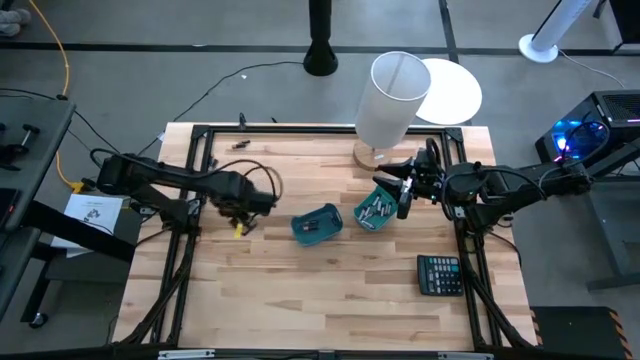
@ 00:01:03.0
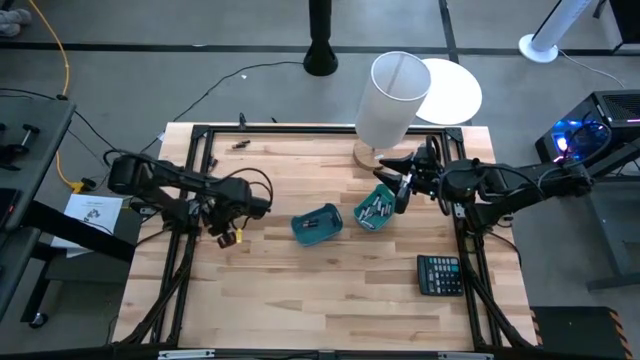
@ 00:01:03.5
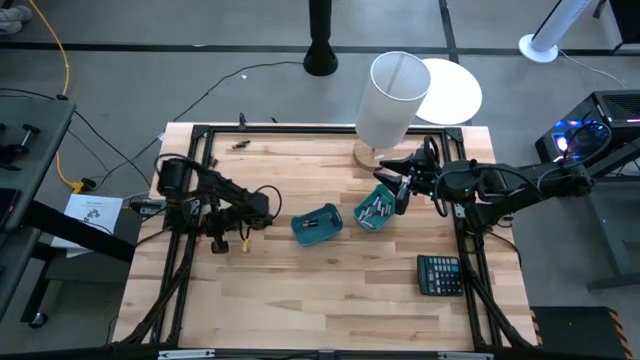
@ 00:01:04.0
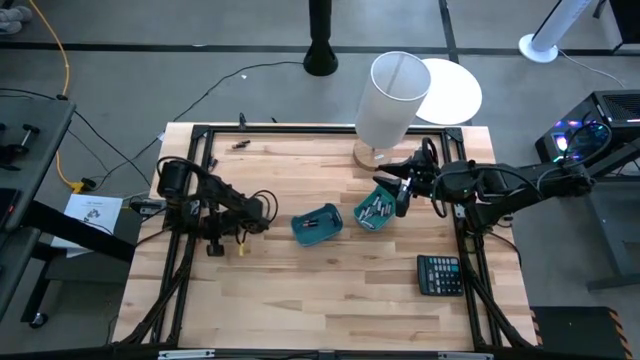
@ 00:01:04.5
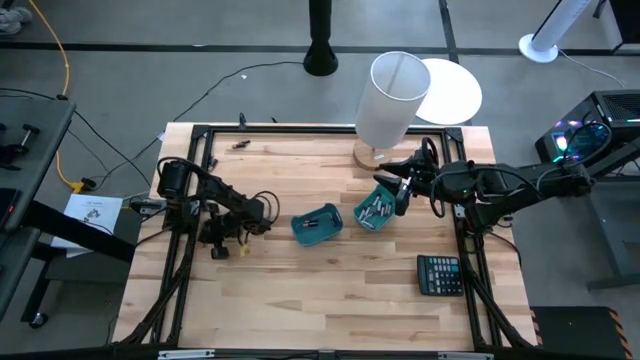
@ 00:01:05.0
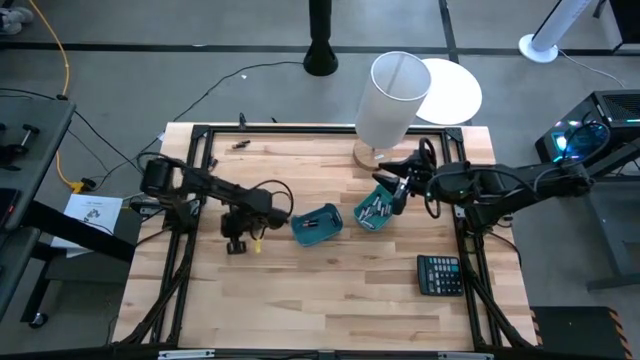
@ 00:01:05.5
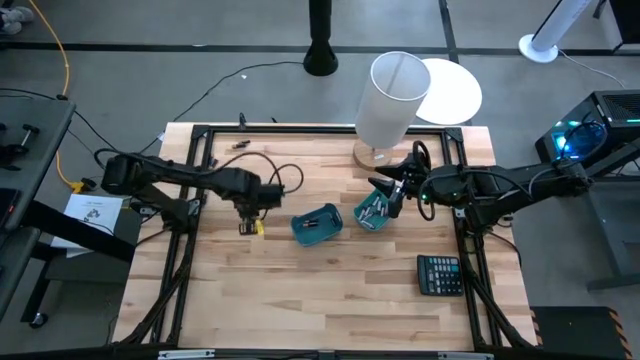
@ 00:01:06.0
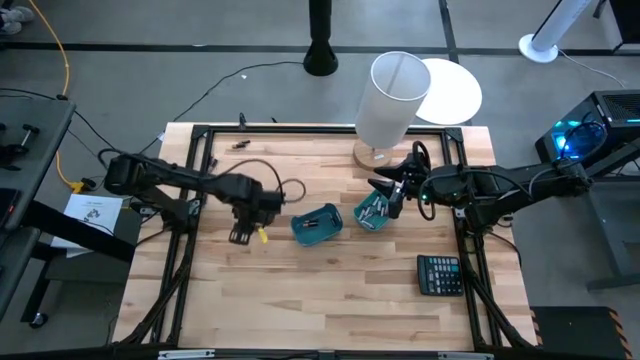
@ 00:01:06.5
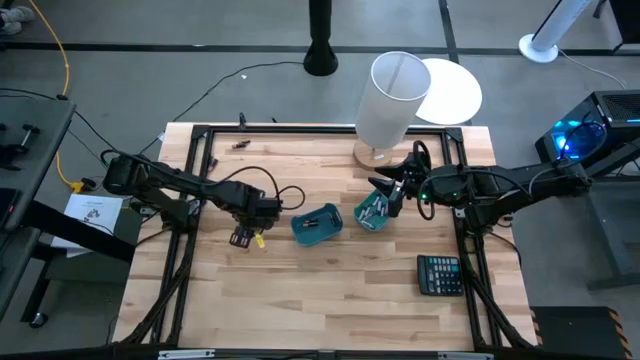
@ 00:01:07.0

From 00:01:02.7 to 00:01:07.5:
Task: Sort batteries
Put the black battery into the blue bin

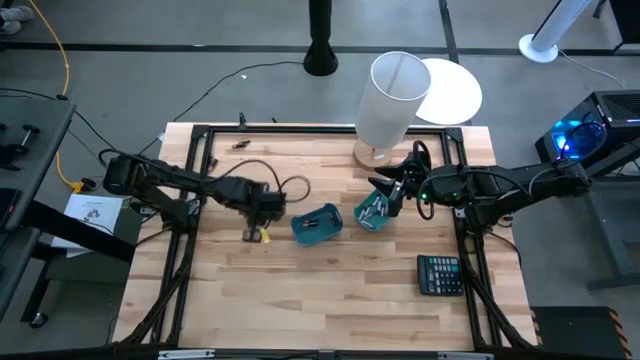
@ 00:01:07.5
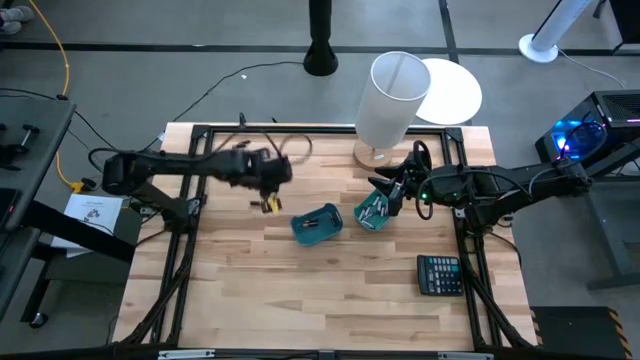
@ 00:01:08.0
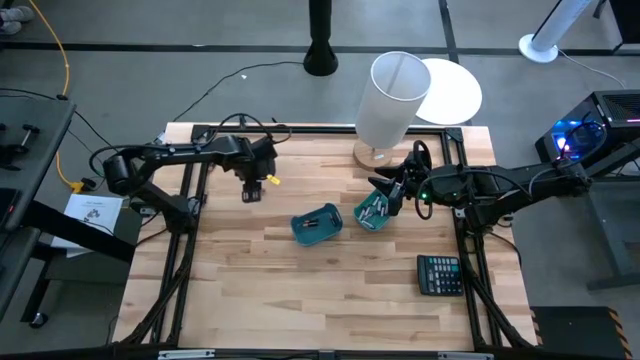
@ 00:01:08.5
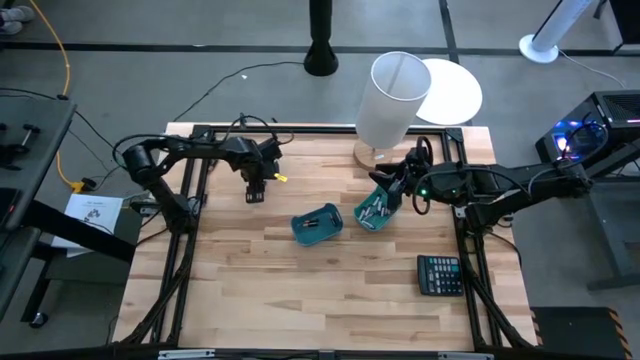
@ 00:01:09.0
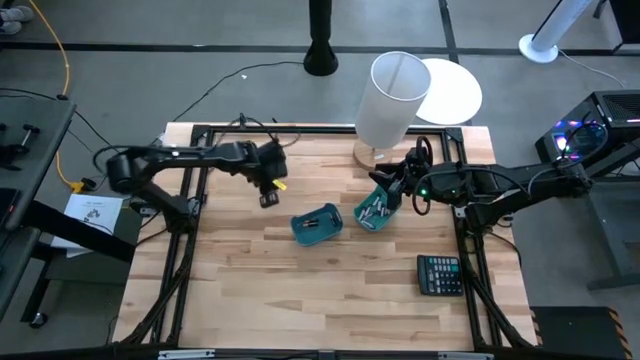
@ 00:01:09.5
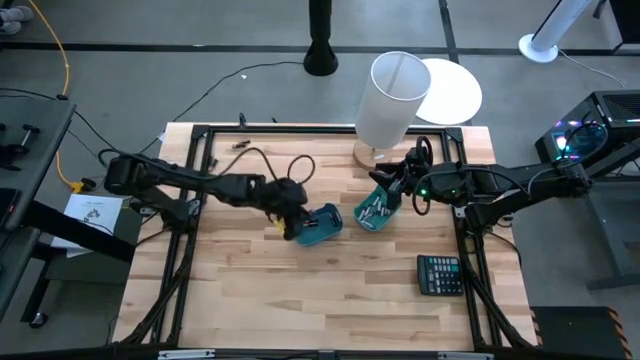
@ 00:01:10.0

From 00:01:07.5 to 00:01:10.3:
Put the black battery into the blue bin

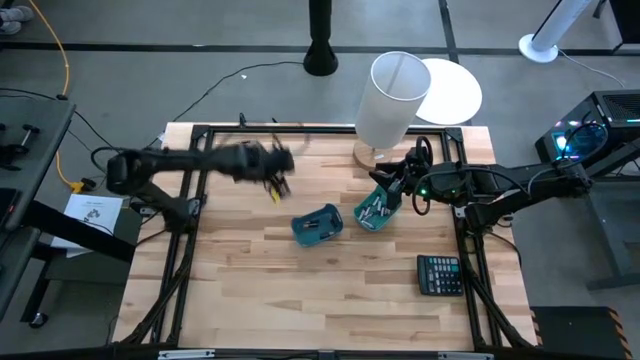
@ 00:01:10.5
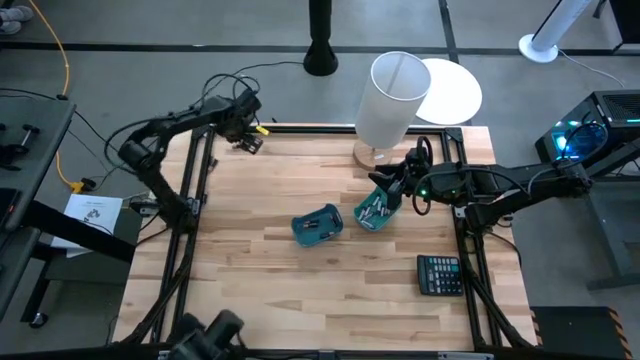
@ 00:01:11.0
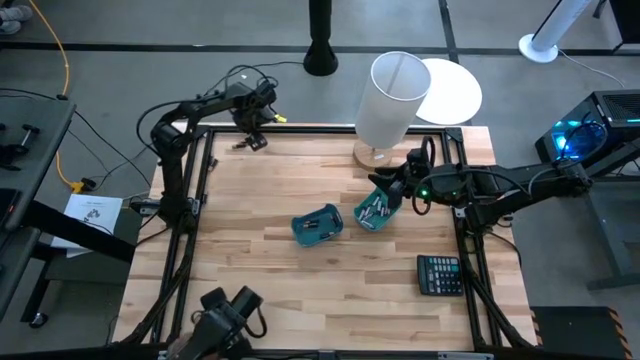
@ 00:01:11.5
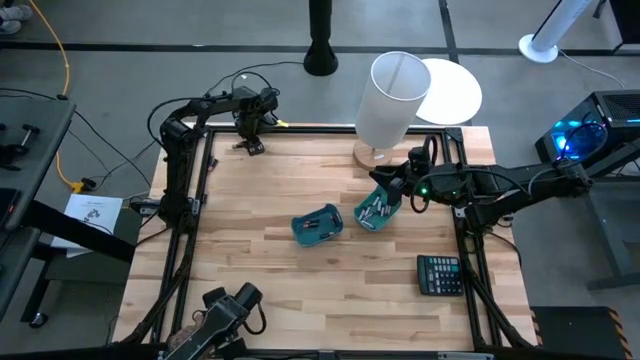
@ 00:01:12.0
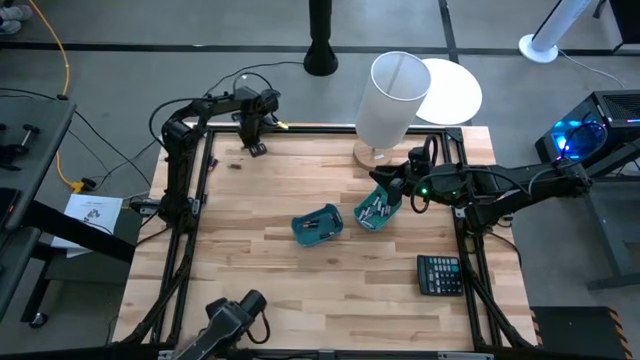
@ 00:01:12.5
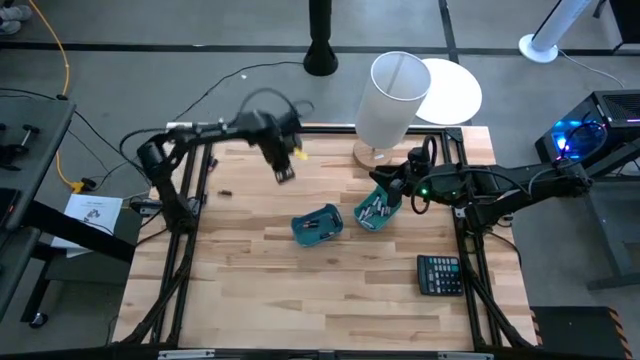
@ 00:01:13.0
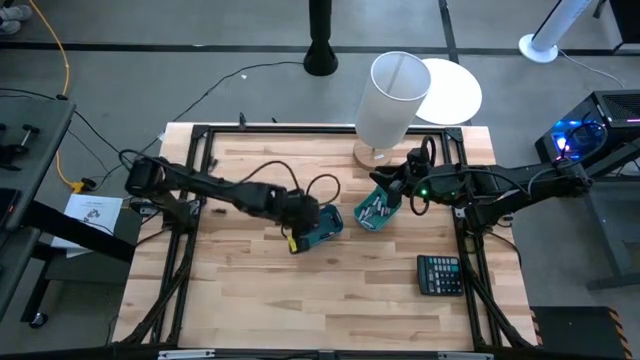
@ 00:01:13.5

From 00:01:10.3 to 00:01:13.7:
Put the black battery into the blue bin

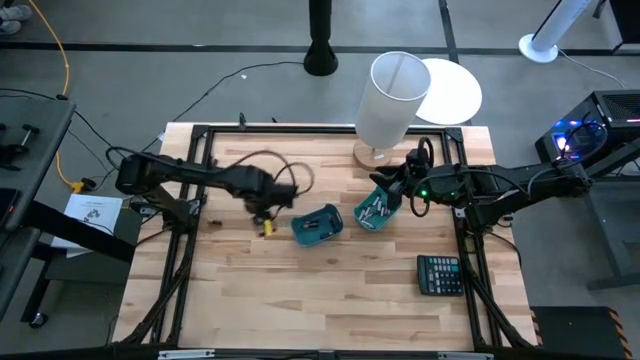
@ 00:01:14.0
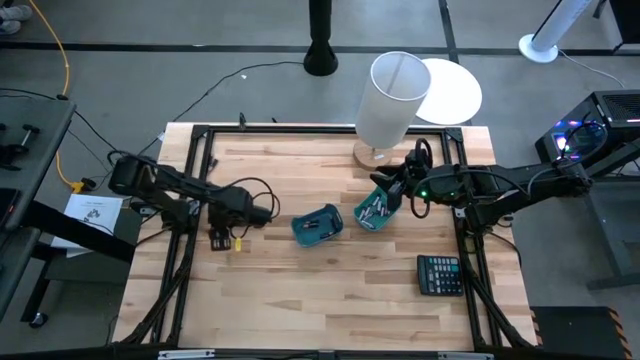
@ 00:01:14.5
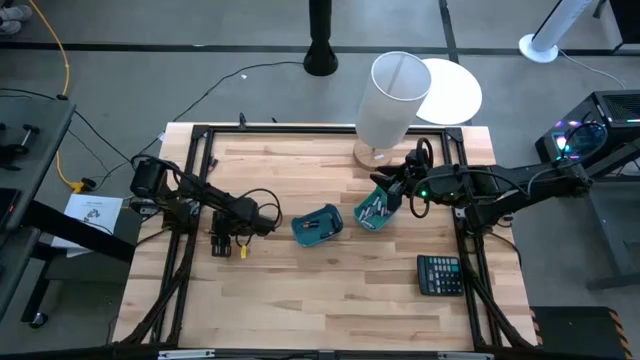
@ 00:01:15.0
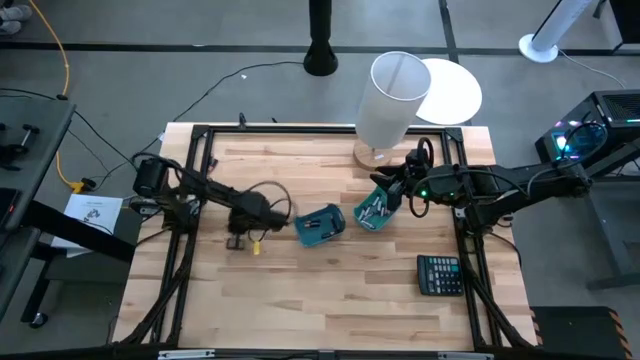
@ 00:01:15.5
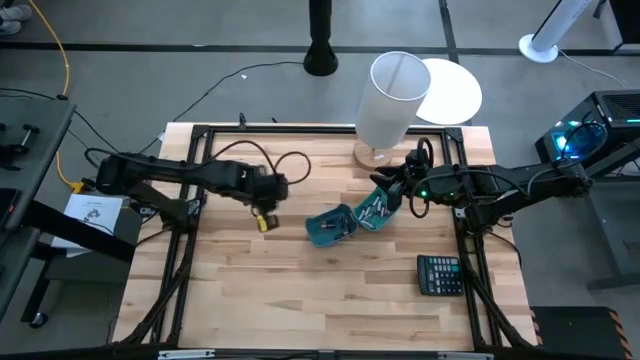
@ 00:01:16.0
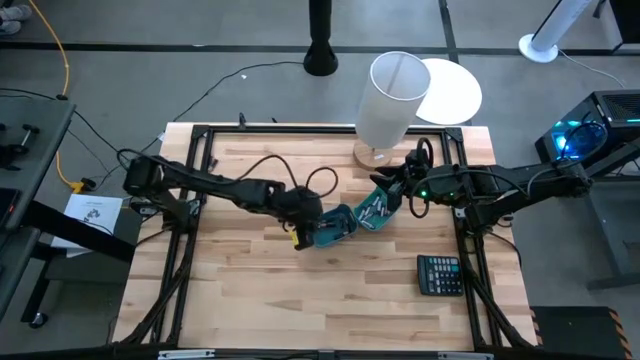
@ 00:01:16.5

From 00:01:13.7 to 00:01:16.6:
Put the black battery into the blue bin

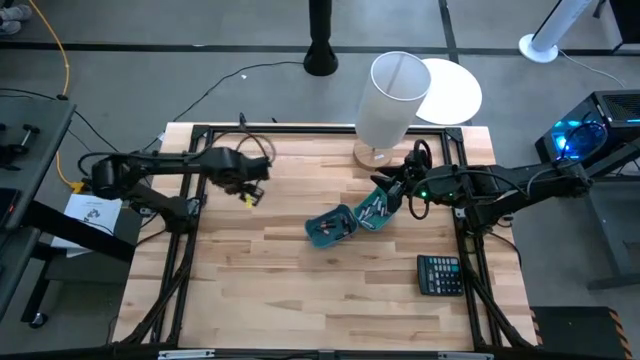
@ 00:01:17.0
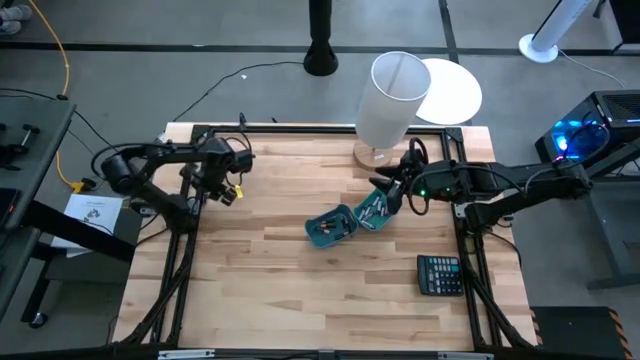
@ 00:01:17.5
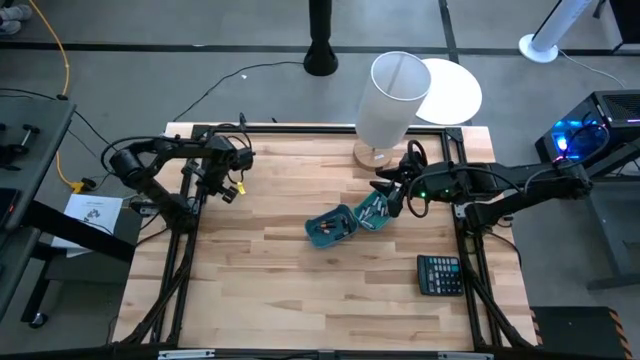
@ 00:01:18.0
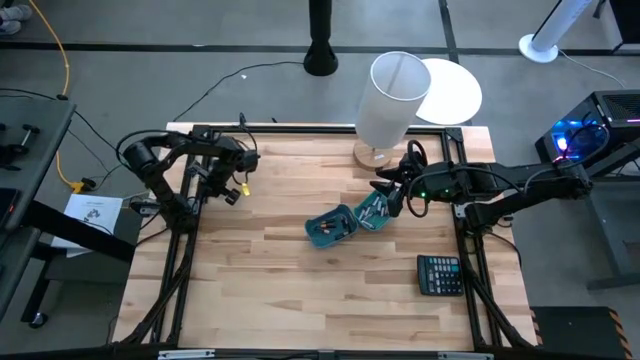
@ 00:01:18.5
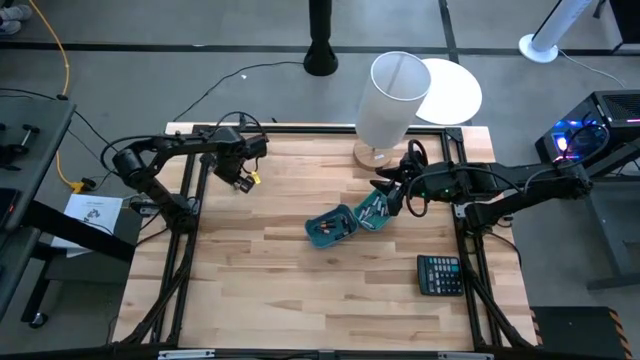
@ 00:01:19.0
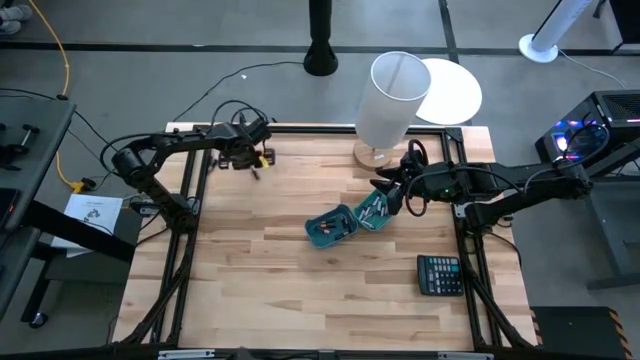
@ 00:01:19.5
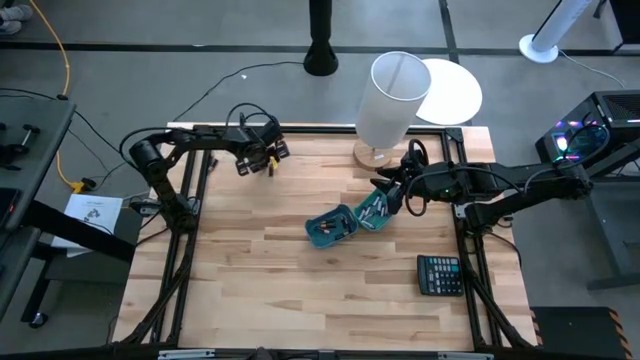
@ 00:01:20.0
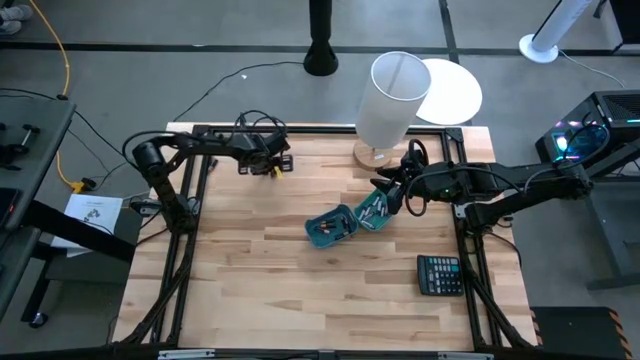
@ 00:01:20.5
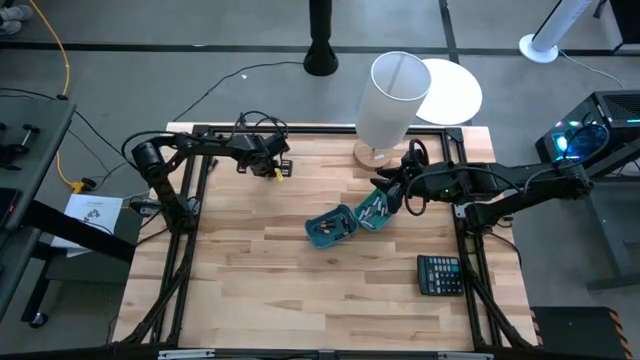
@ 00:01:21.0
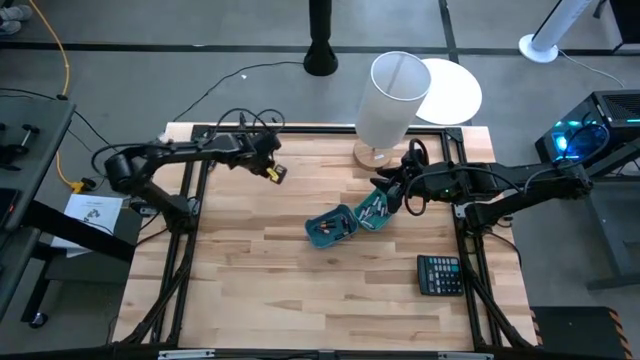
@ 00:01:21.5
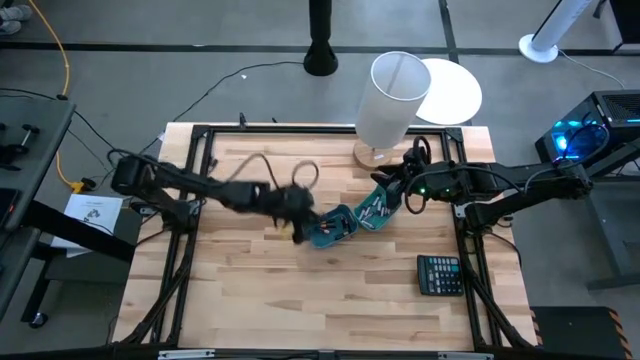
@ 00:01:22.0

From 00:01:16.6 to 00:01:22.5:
Put the battery into the blue bin

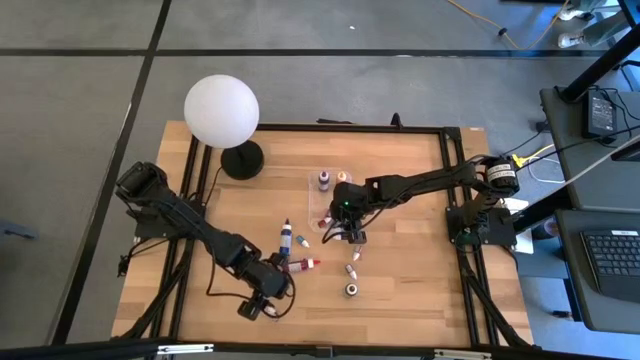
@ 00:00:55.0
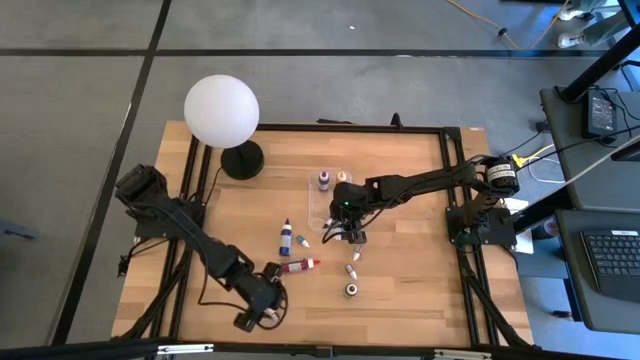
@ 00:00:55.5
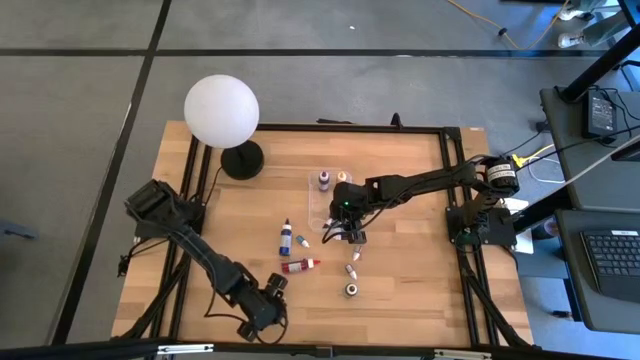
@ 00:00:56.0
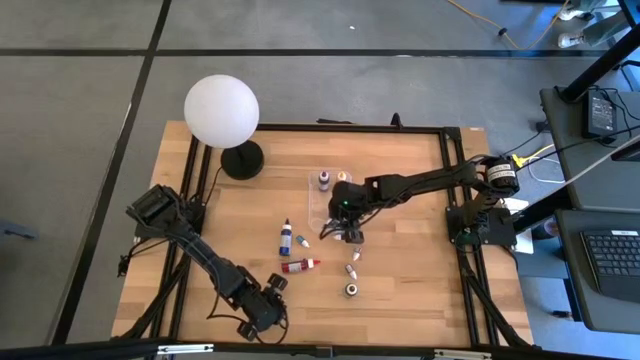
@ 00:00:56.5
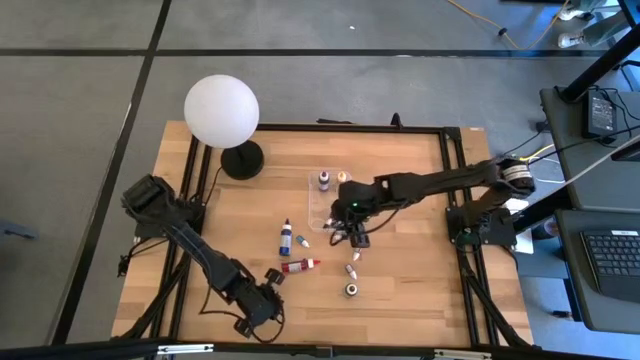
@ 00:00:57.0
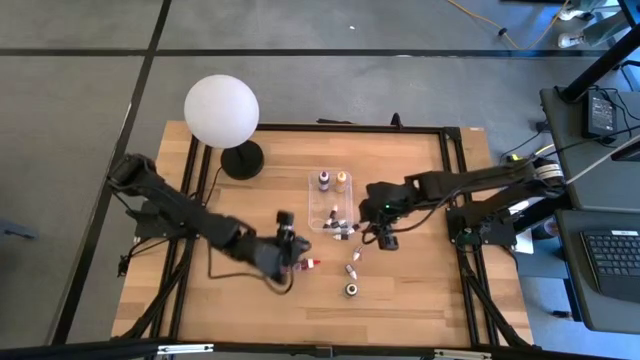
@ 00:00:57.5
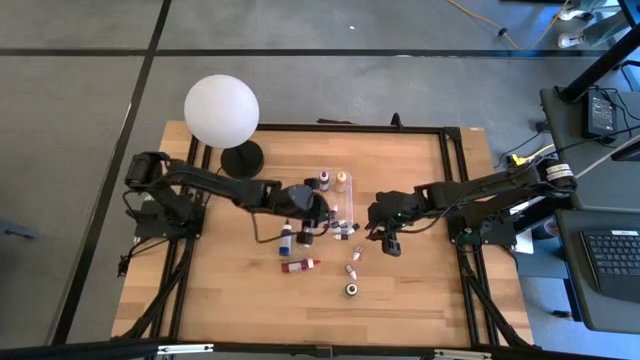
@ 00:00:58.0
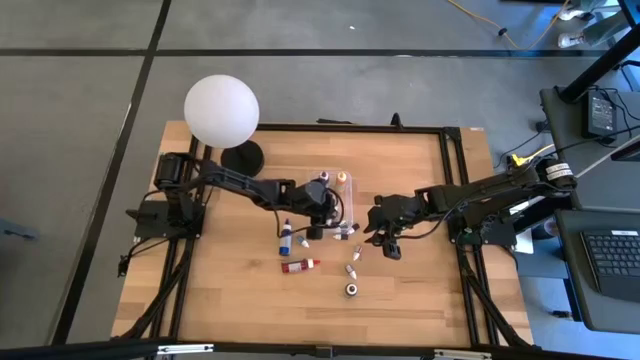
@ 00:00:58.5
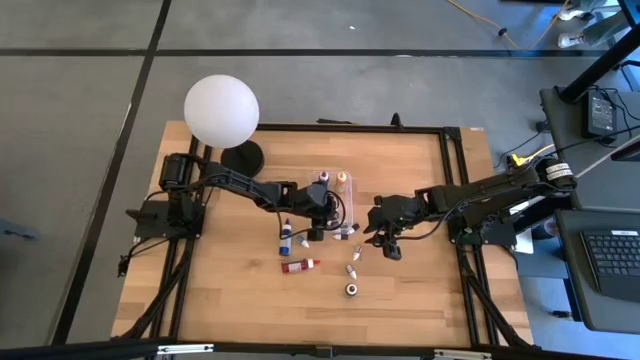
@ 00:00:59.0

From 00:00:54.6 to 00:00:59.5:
Task: Pick & Place food coloring
Put the small black food coloring bottle in the transparent bin
